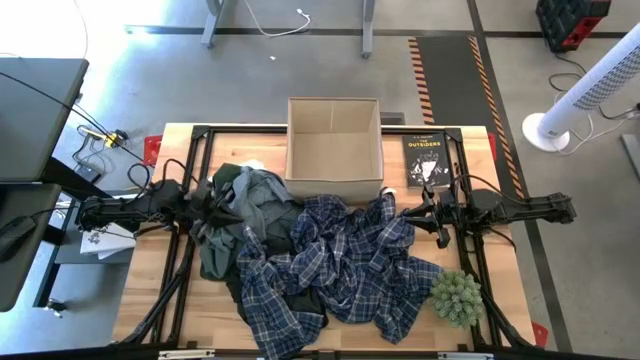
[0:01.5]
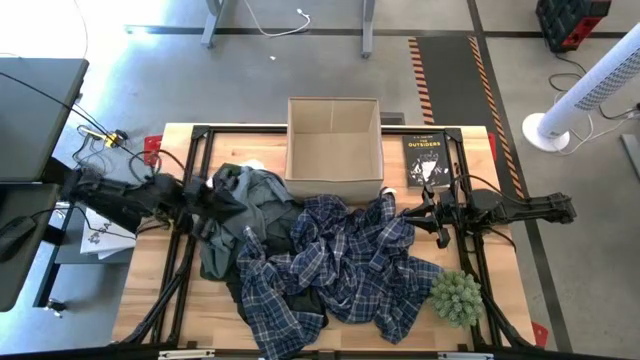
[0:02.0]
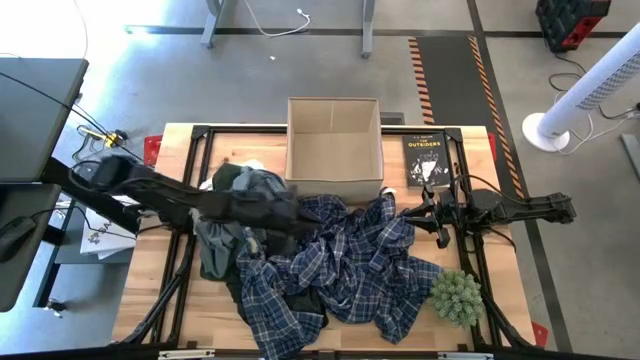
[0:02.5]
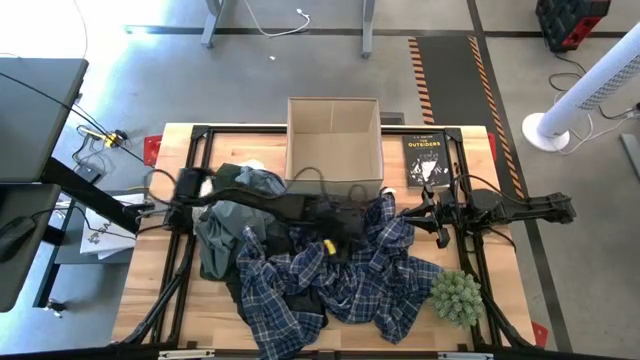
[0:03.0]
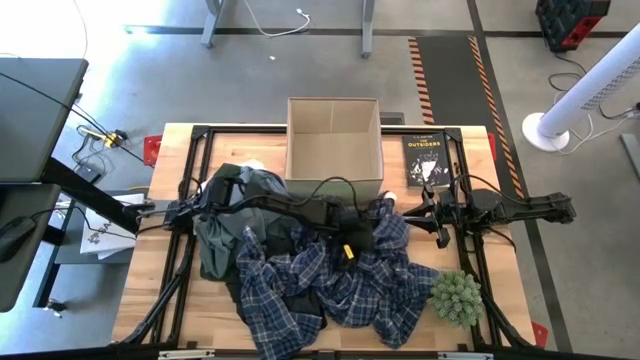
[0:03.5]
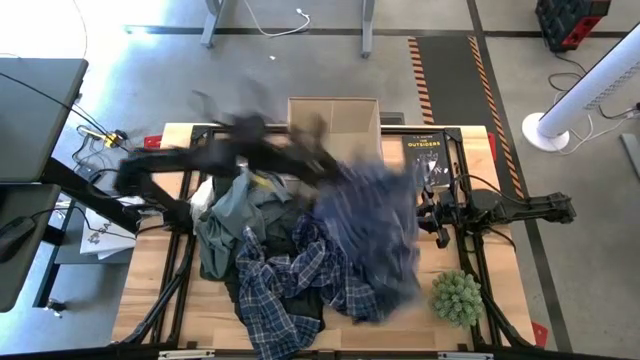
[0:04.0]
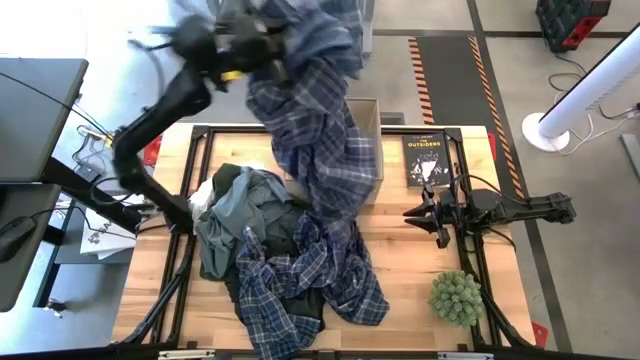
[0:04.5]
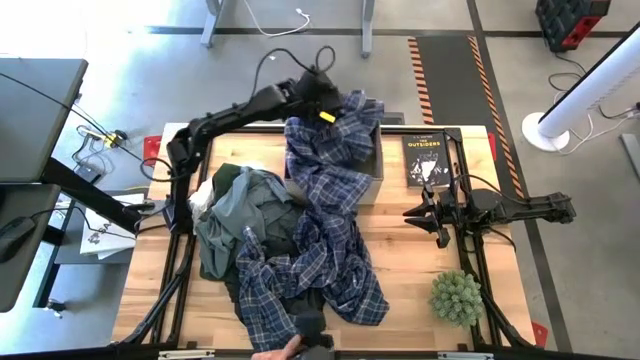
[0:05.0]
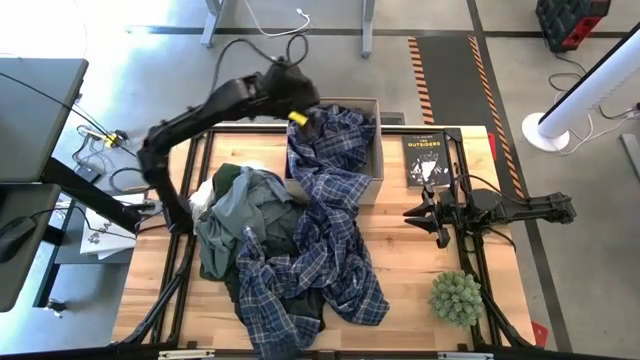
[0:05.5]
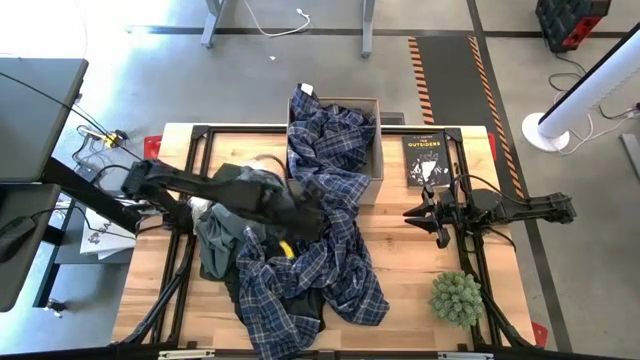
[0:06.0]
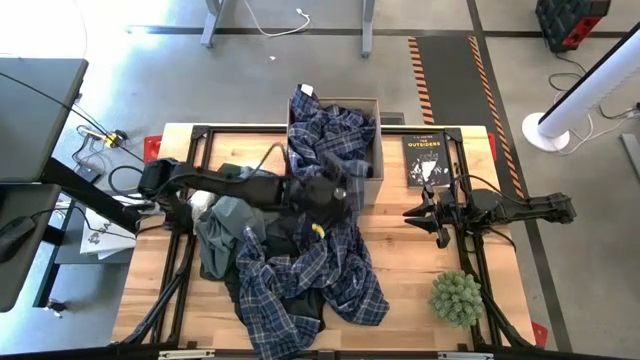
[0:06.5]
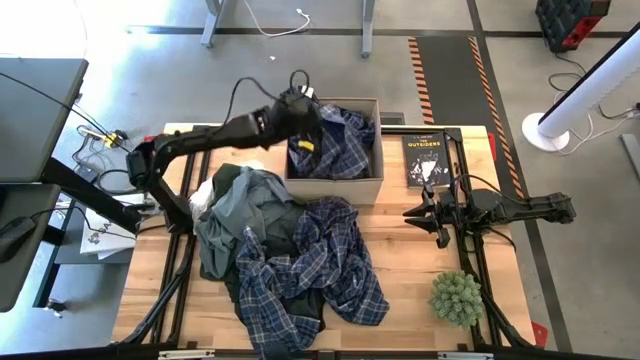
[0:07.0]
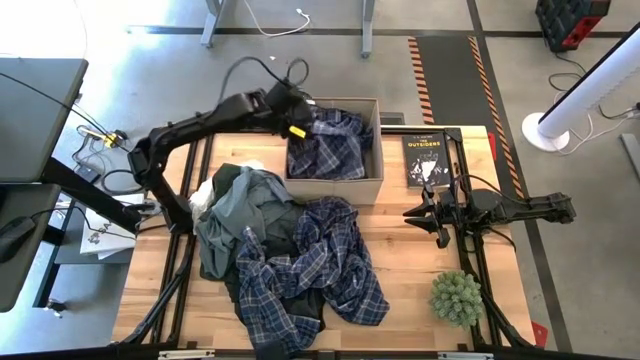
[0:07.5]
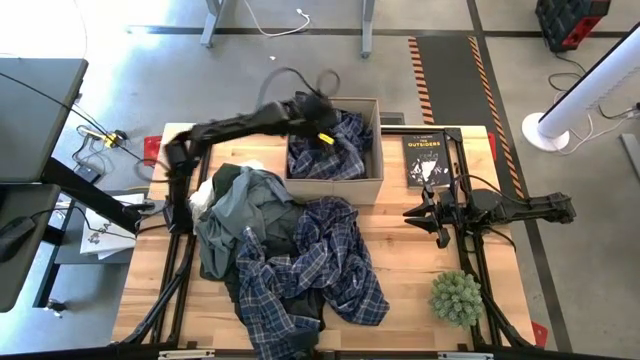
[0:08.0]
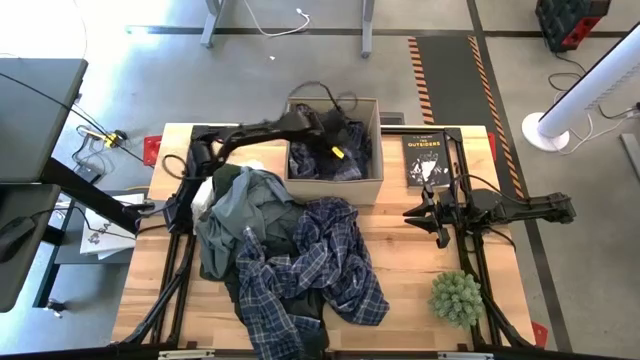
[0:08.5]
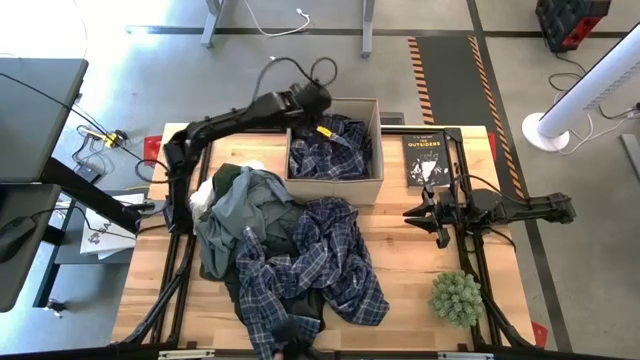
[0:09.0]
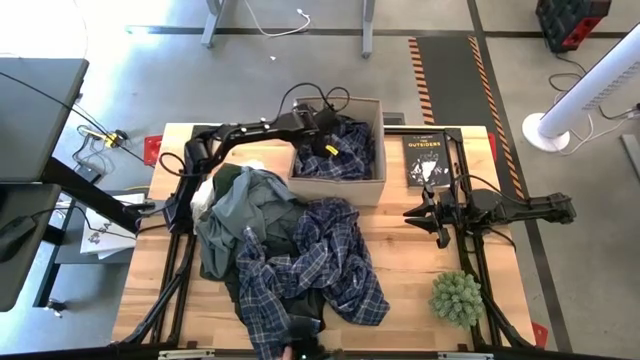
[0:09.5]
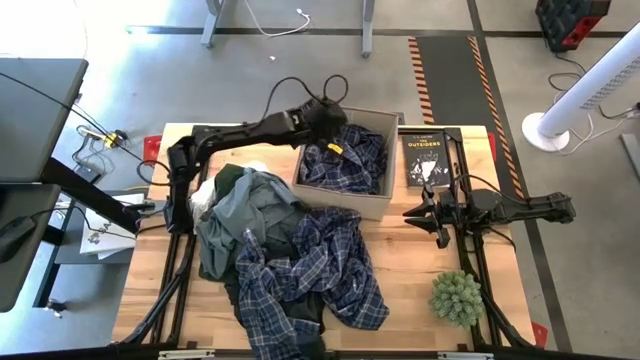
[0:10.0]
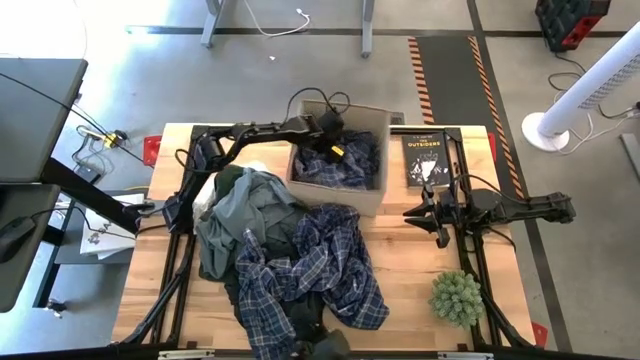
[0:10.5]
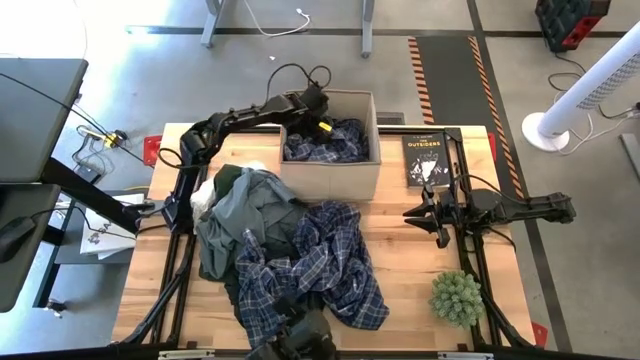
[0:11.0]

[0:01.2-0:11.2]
Task: Sort clothes
Put the blue pattern long sleeve shirt into the laundry organizer

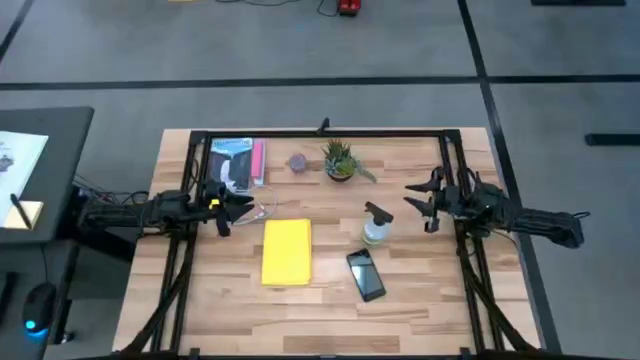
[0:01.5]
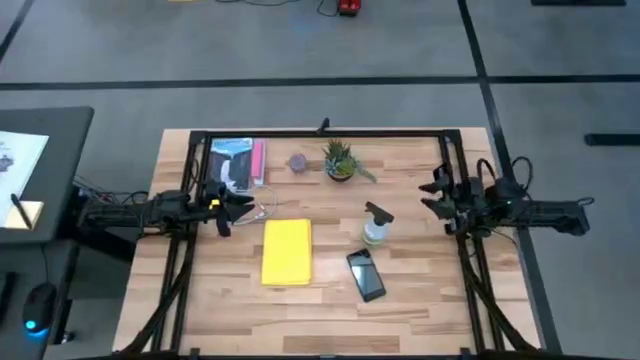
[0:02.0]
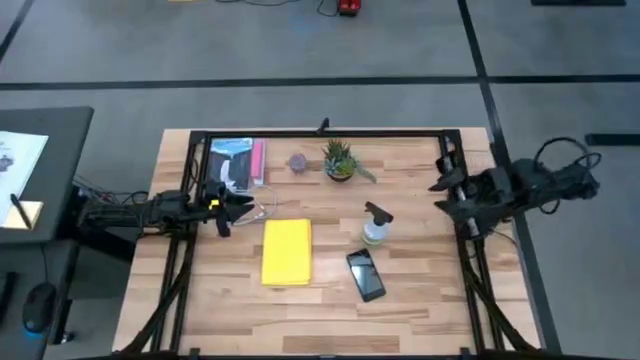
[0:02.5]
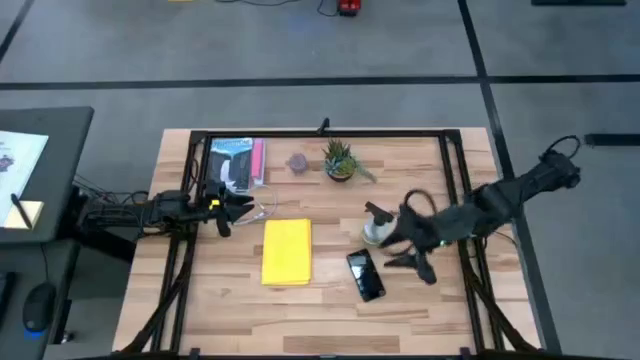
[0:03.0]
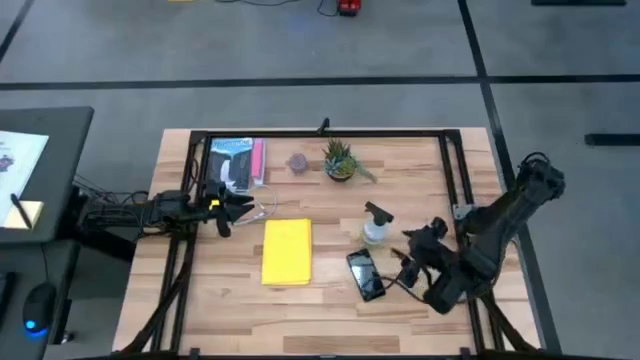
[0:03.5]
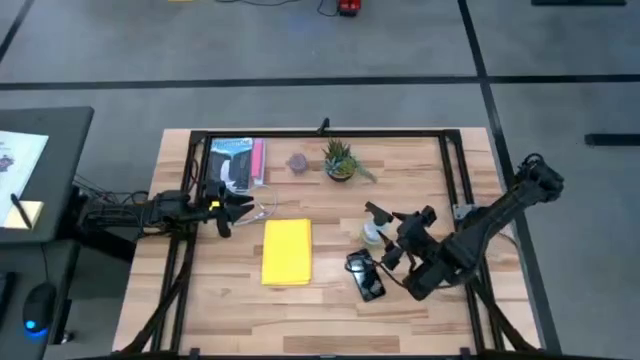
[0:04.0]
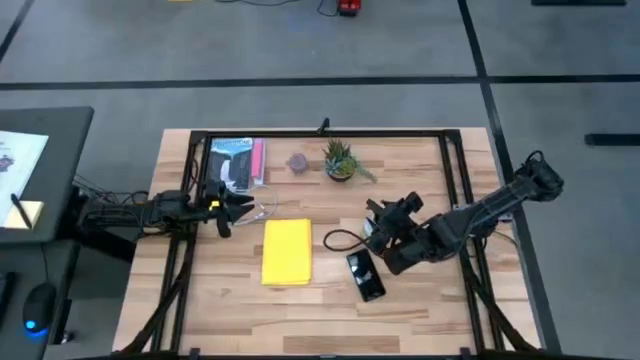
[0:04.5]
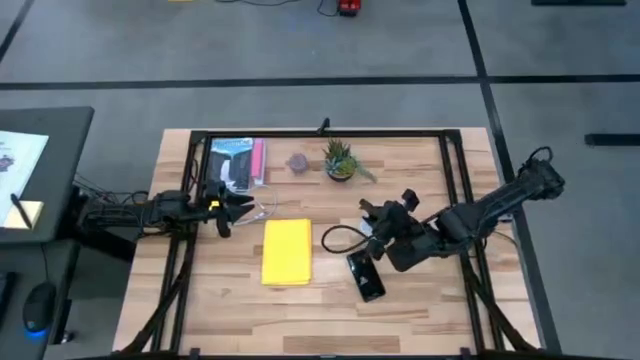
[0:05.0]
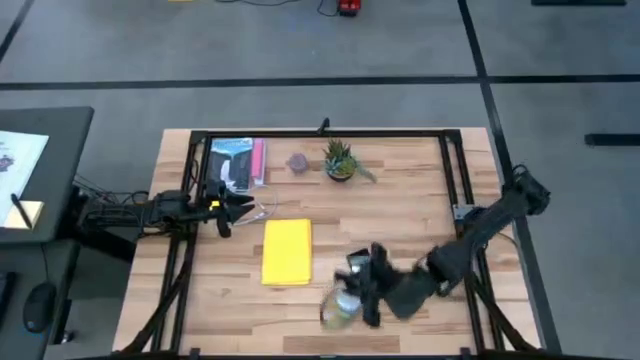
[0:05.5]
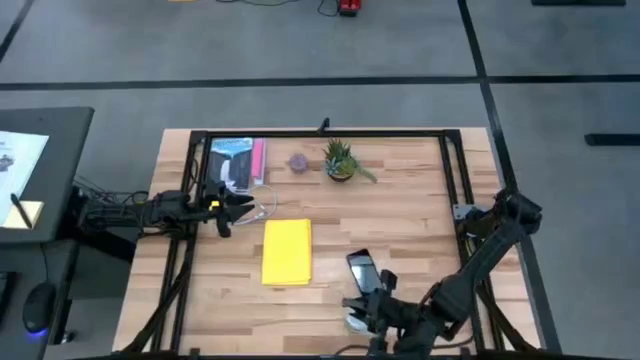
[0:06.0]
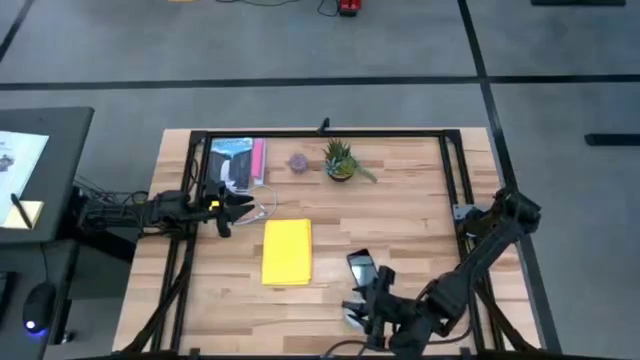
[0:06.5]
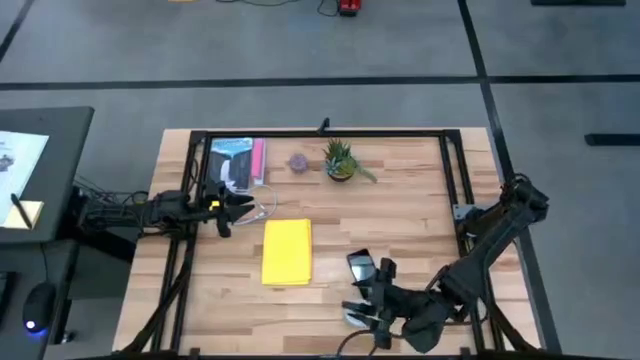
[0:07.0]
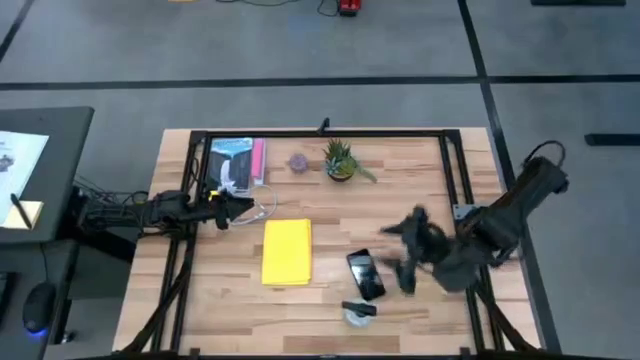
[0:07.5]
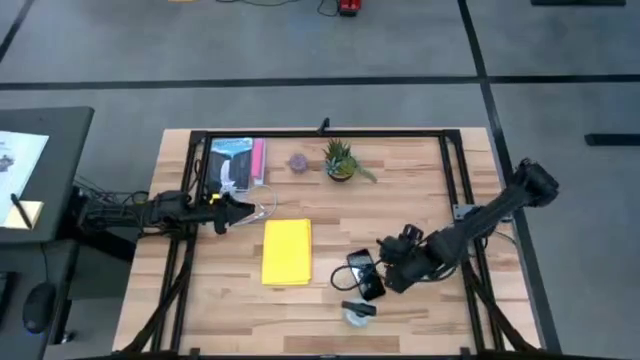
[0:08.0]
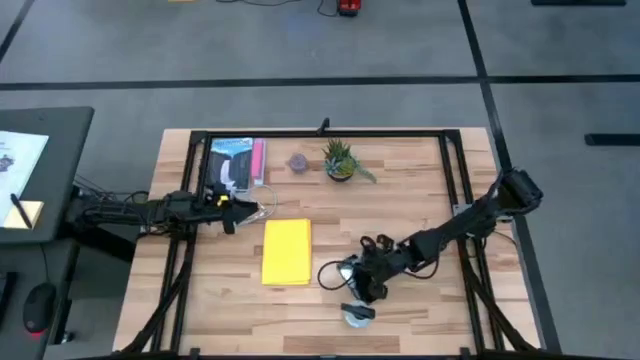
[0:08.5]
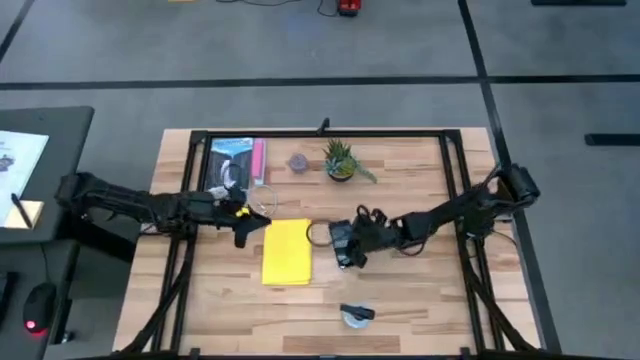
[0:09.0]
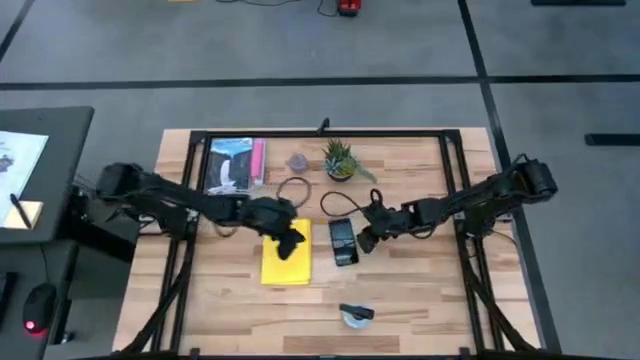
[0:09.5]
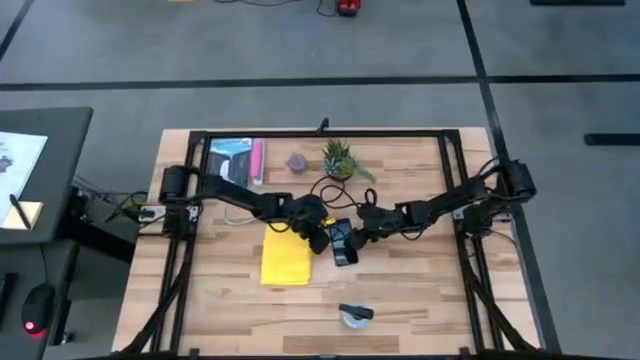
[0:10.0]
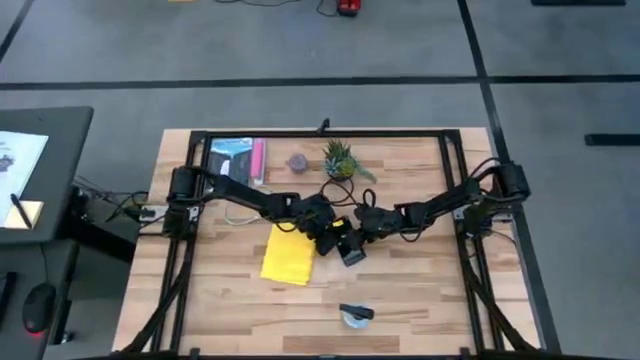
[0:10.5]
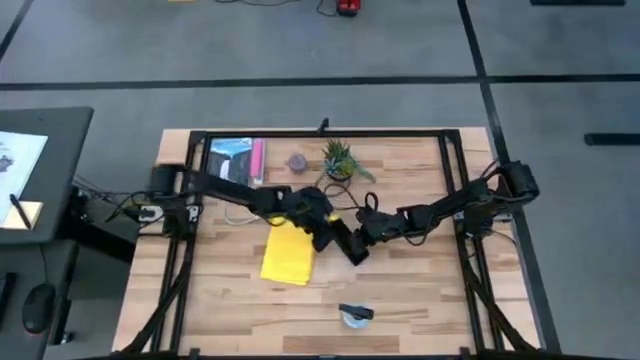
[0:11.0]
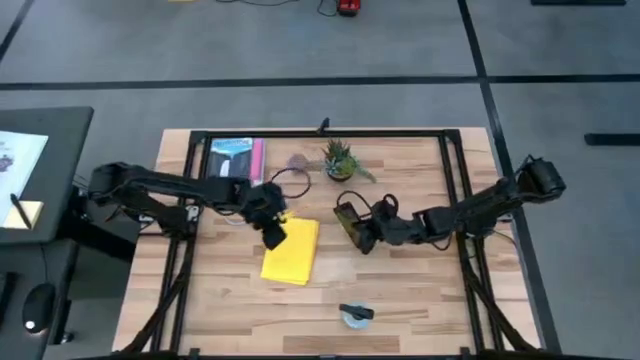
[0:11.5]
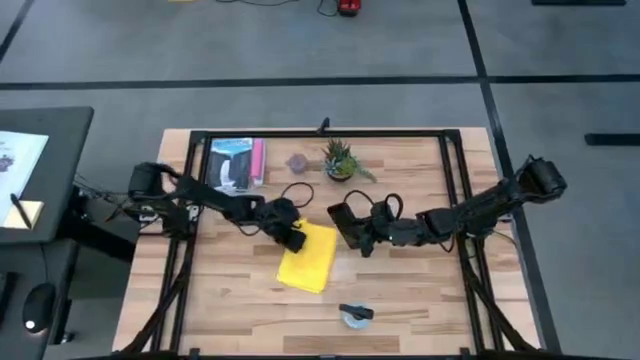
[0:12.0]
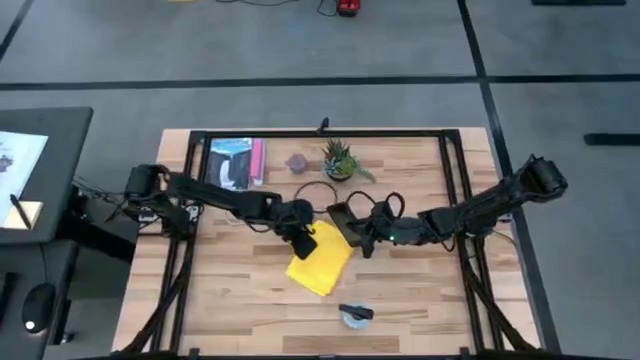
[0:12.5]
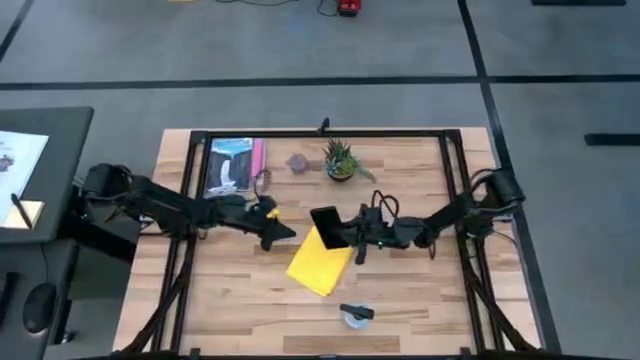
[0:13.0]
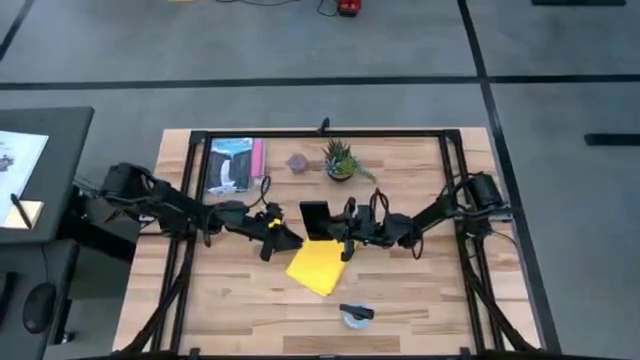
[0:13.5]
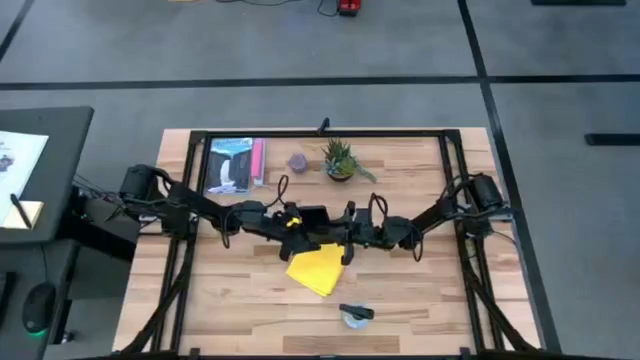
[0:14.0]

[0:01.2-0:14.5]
Task: Apply microfiber cloth
Spray the front of the cellphone
